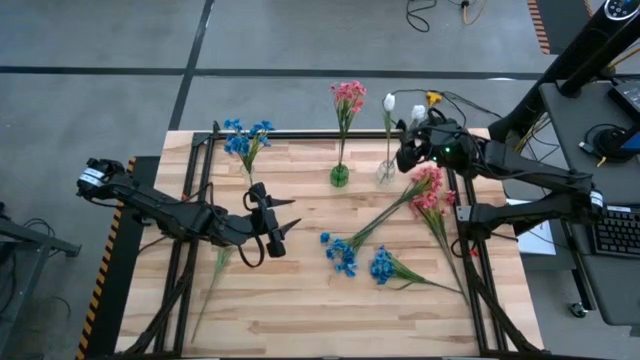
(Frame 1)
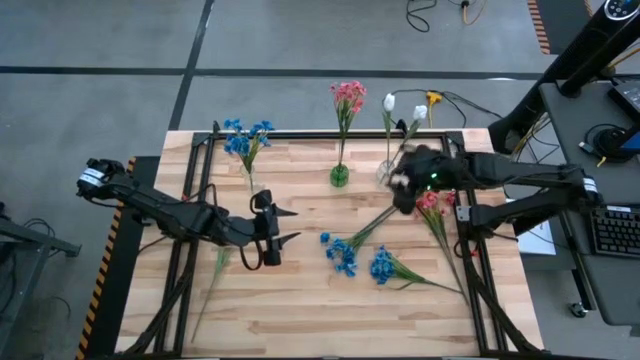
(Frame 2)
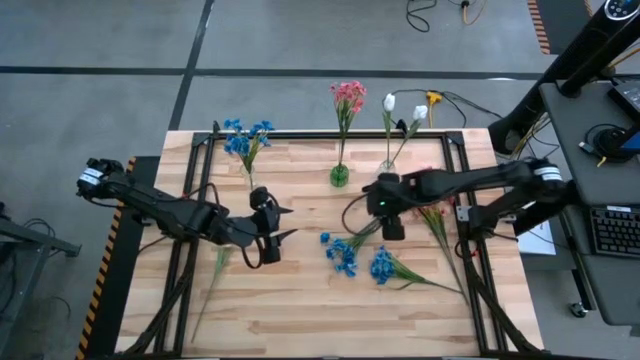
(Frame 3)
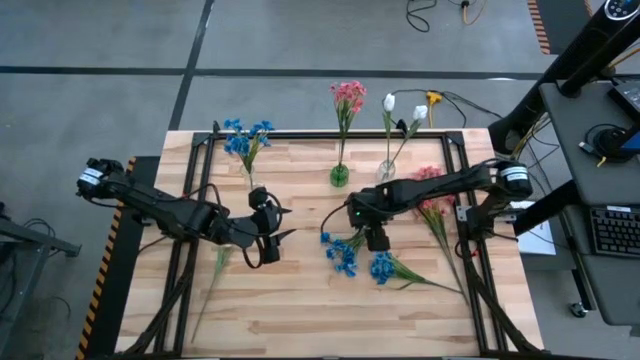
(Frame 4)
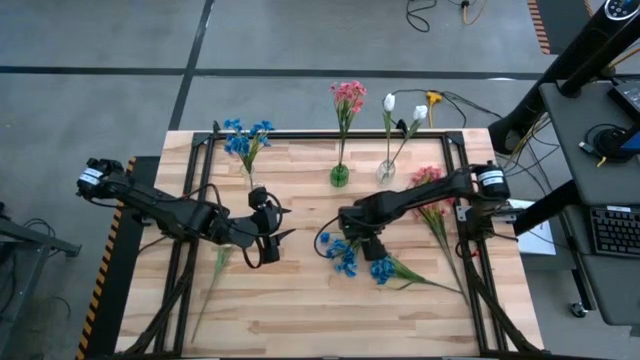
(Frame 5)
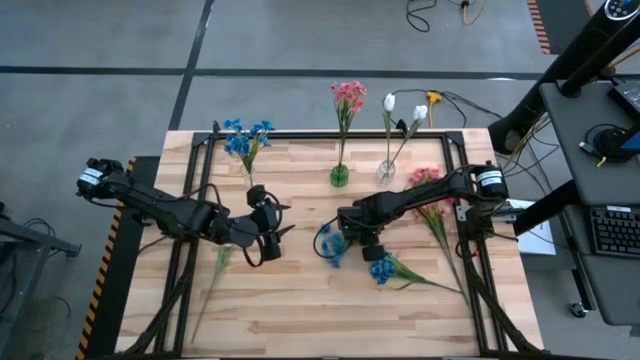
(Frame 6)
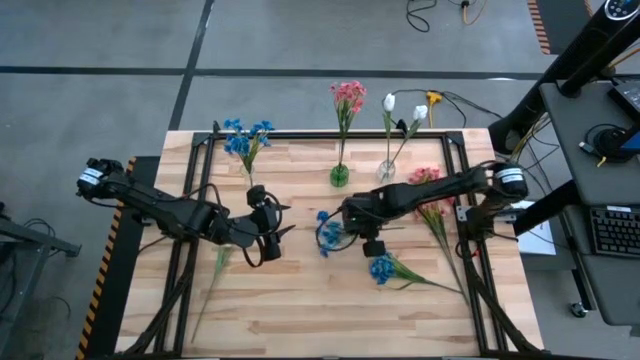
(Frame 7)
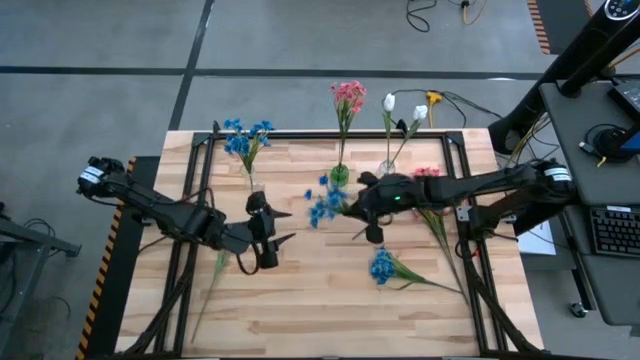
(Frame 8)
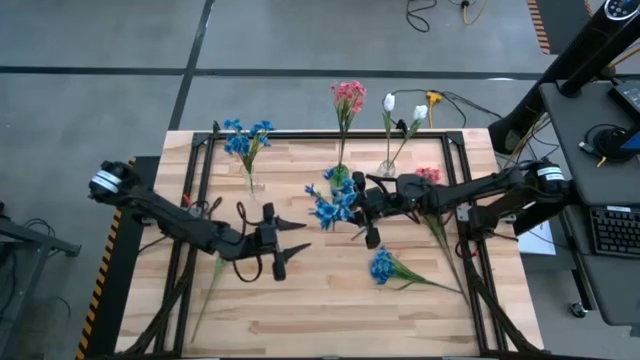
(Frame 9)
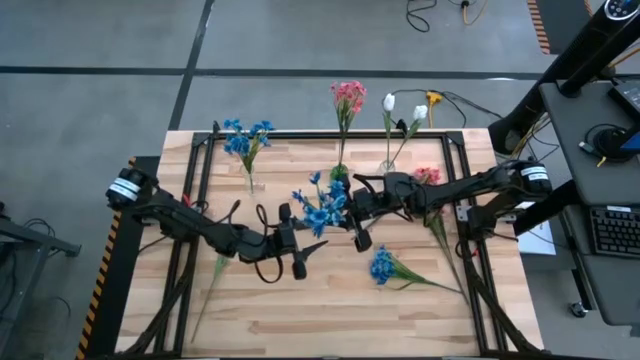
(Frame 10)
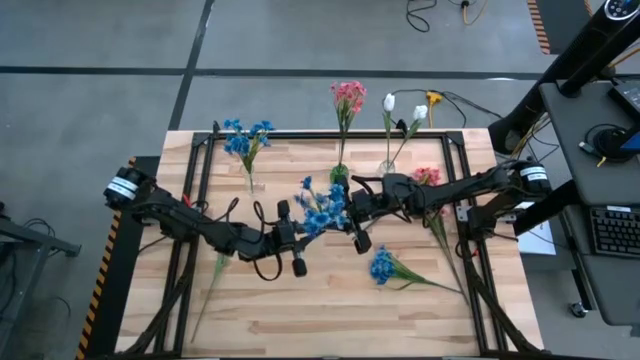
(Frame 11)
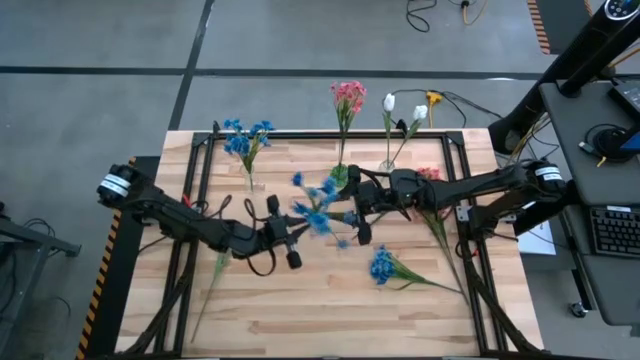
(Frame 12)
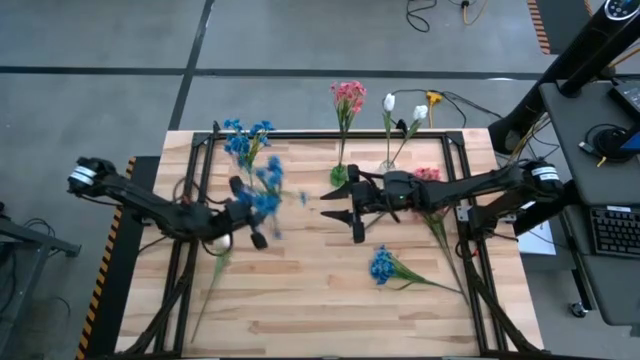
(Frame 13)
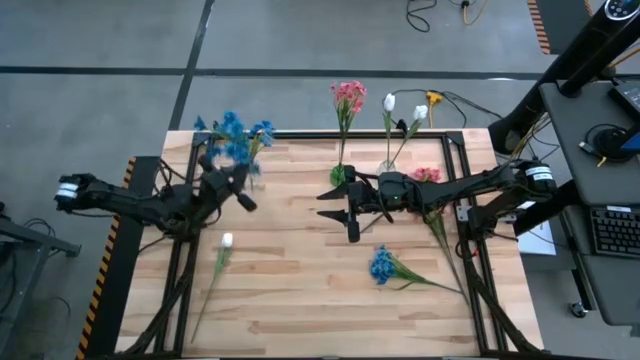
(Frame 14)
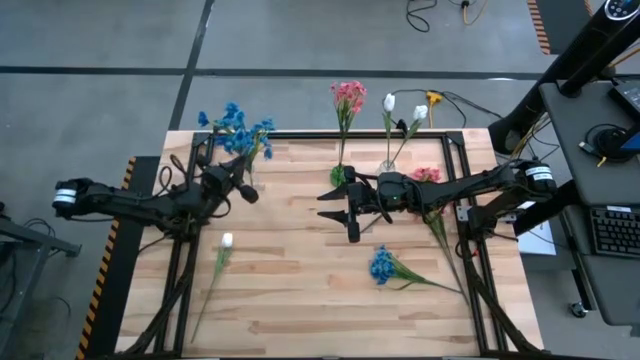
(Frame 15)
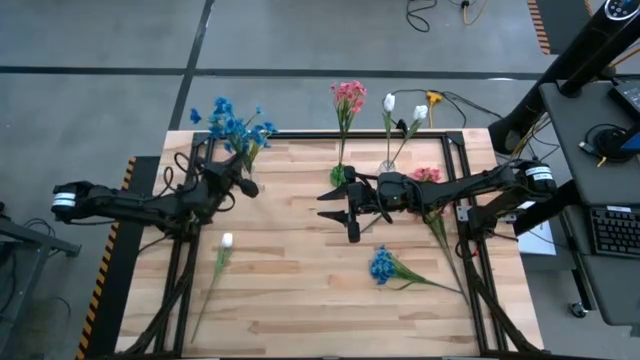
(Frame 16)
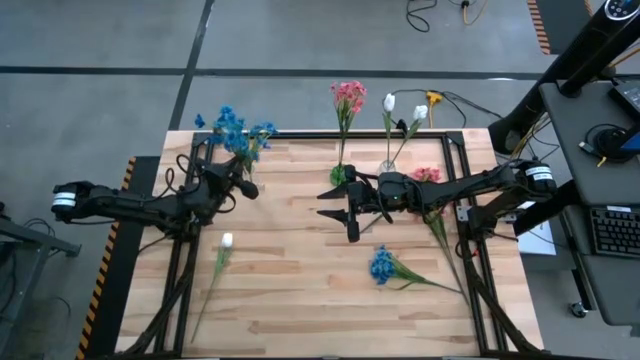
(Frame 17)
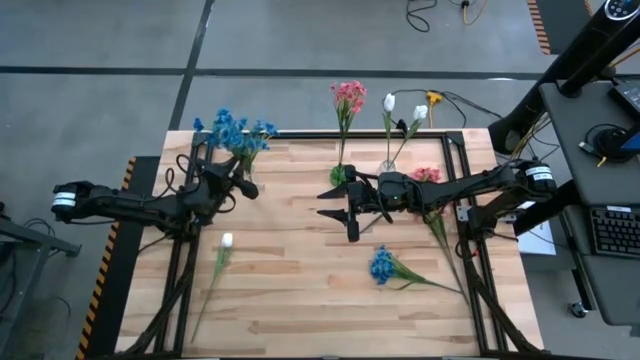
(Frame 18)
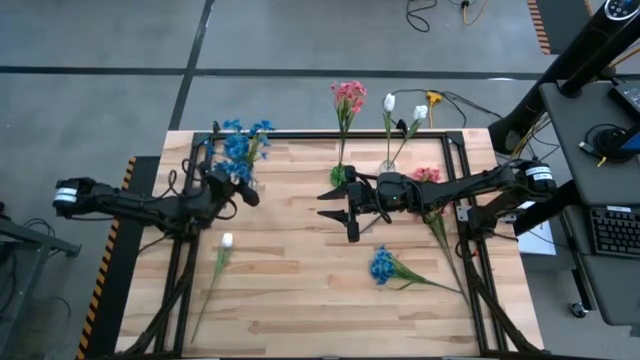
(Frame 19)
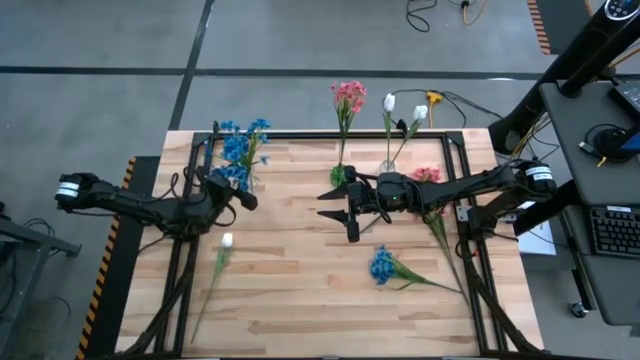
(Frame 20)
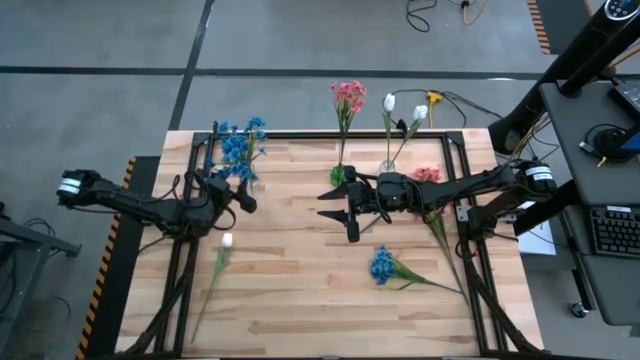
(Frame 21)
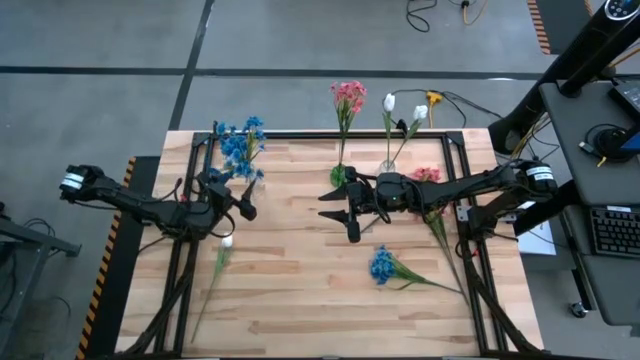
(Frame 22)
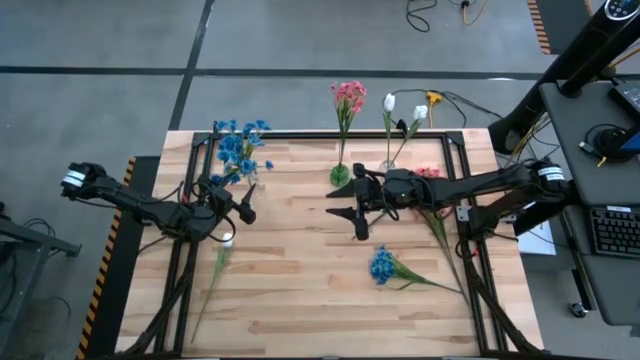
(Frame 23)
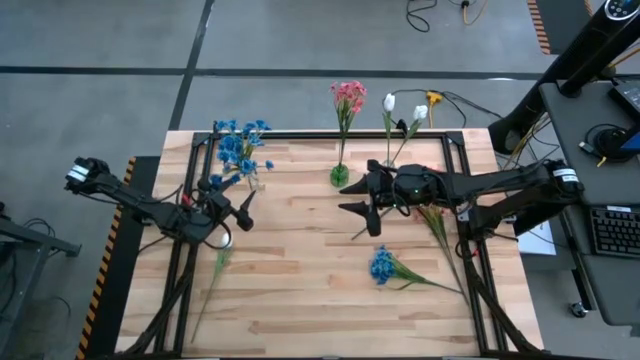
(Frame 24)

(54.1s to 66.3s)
Task: Sort flowers into vase by color
Put the left blue flowers into the left transparent vase

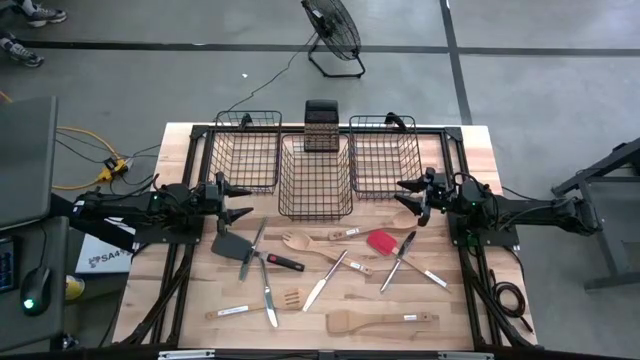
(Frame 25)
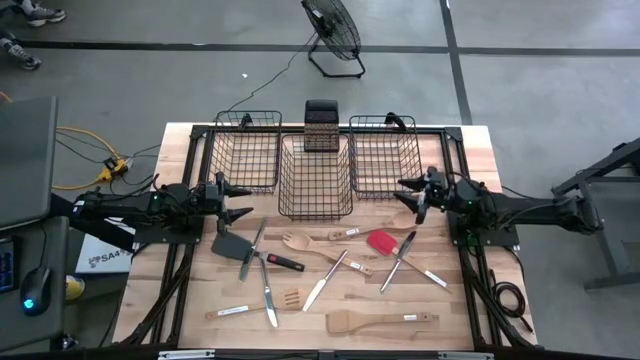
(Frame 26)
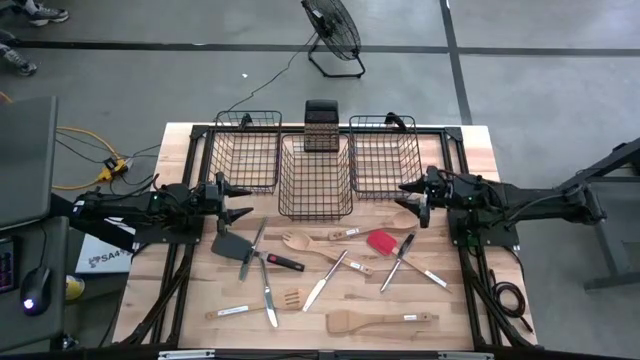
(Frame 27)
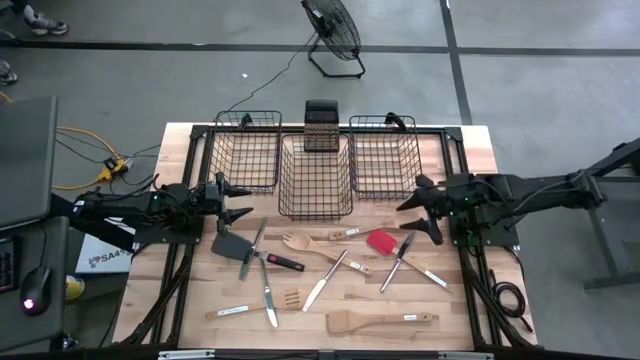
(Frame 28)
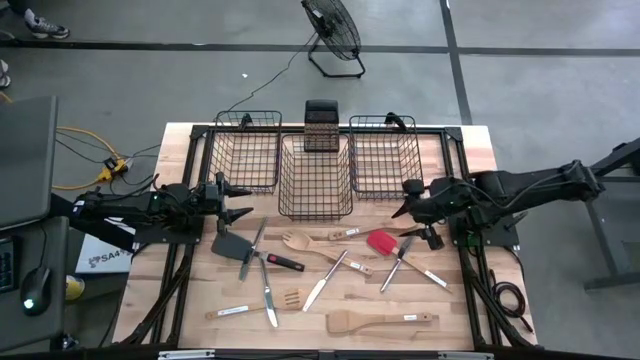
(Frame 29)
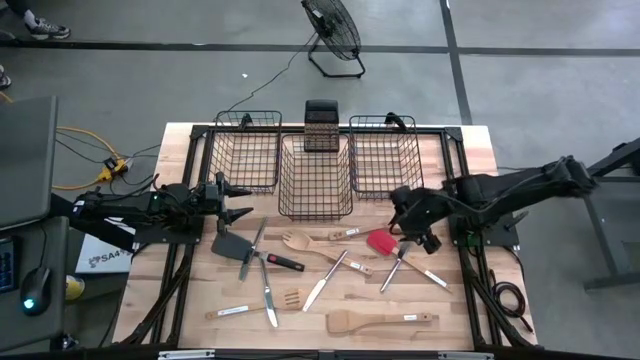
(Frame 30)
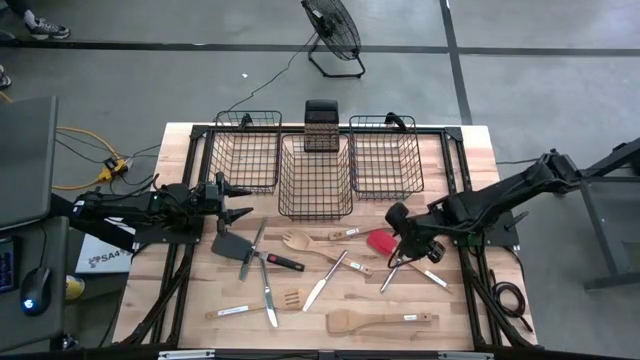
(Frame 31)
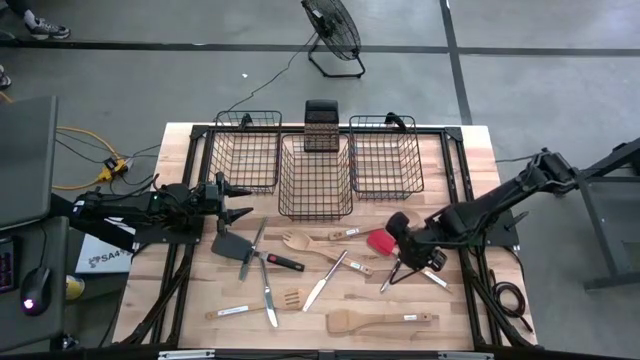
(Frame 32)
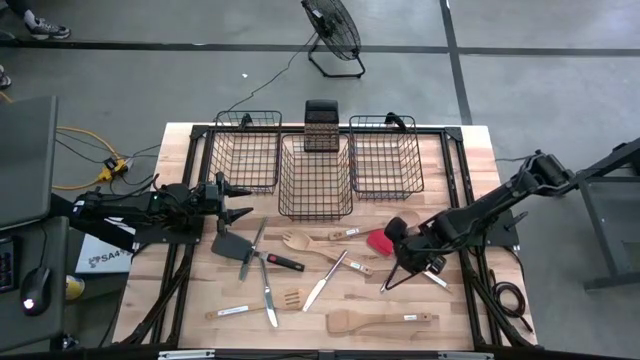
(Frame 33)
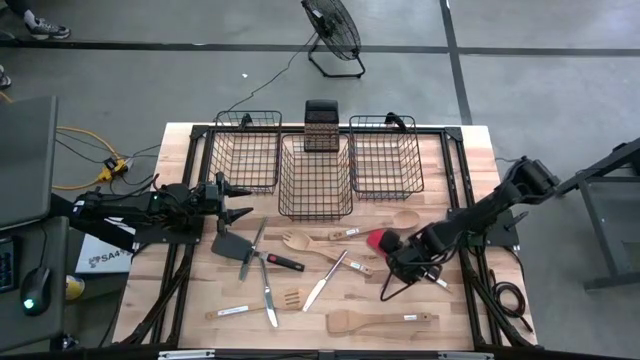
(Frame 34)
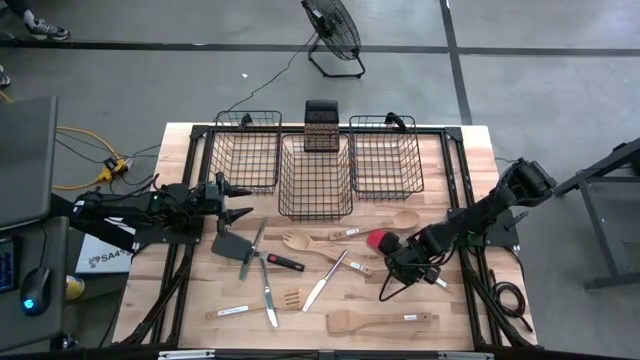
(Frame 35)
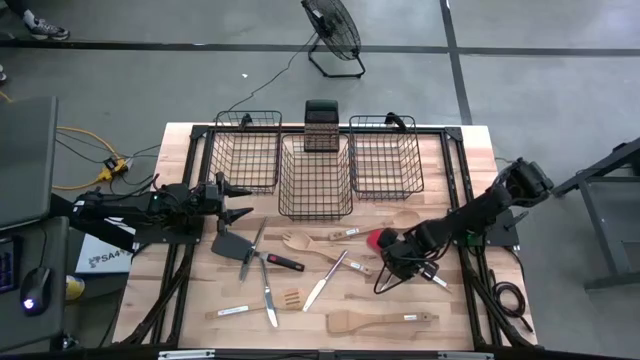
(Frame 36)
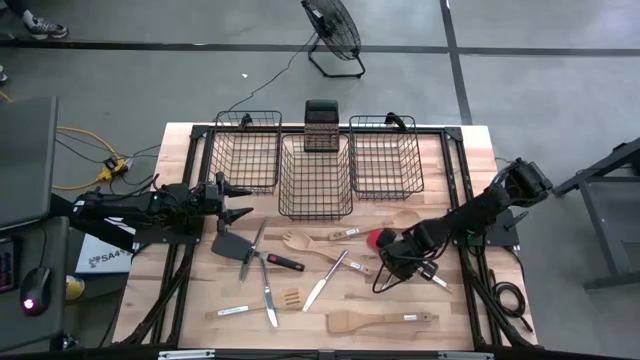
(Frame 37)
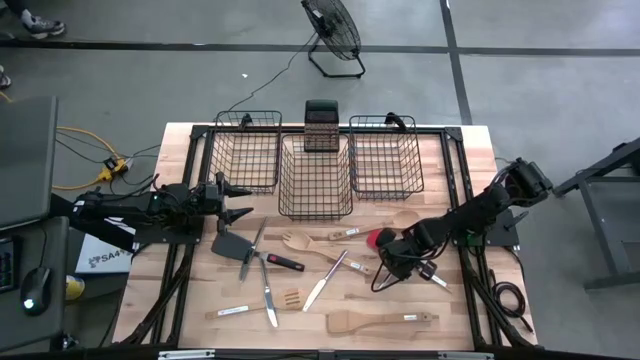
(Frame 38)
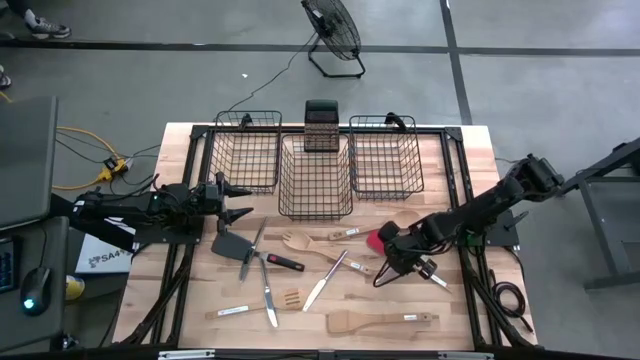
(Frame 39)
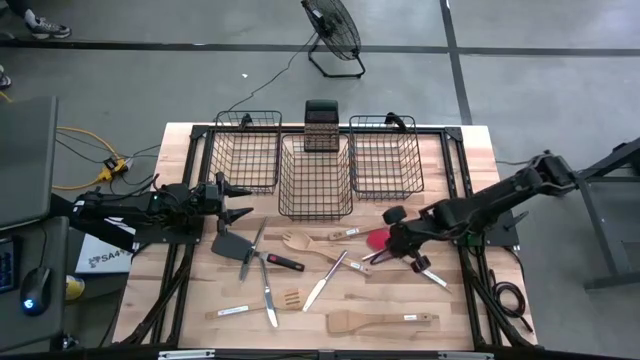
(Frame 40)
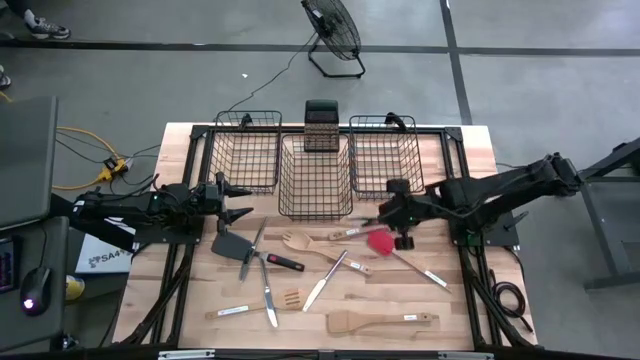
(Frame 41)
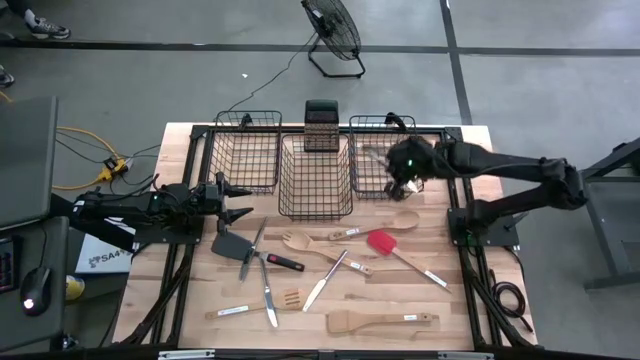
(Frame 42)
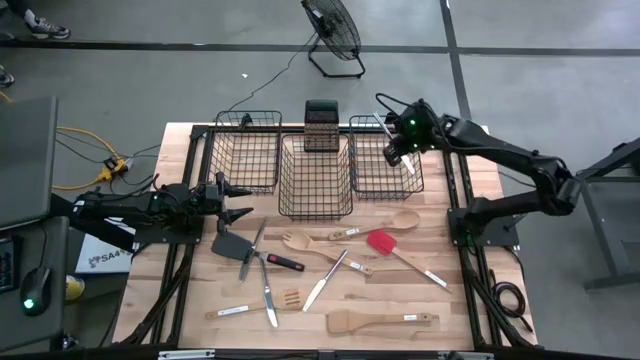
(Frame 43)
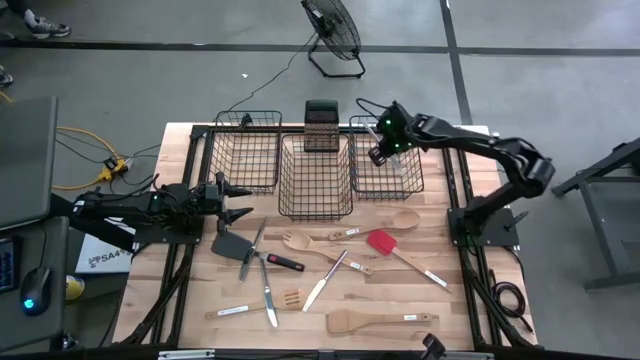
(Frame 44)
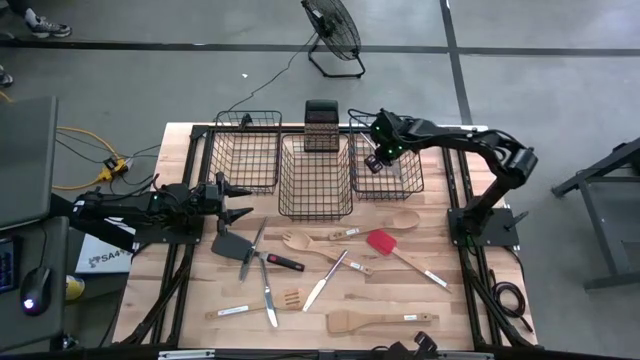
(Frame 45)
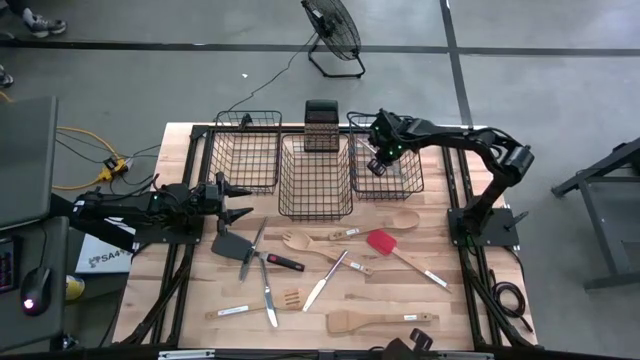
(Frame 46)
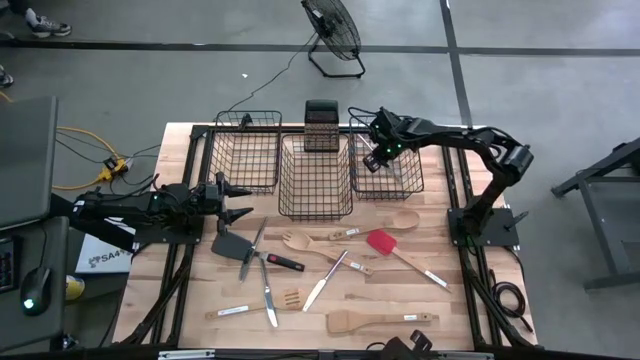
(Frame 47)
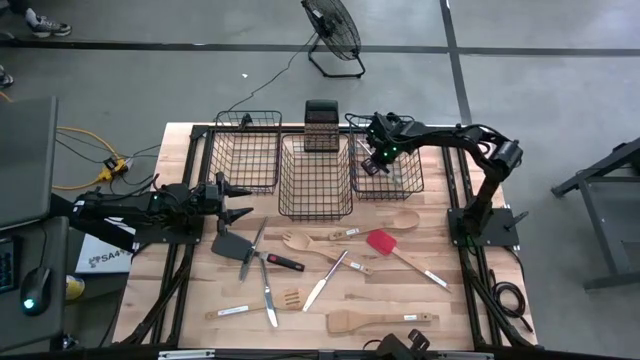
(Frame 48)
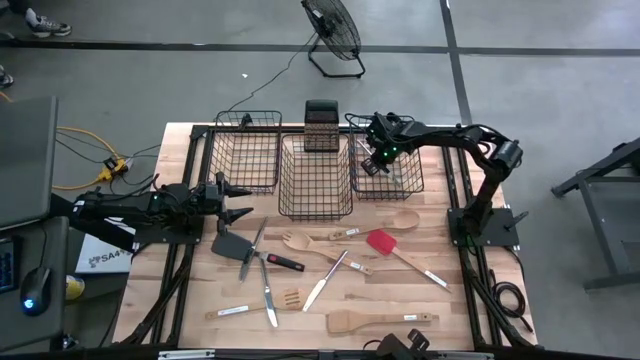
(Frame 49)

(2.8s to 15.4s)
Task: Pick & Place Kitchen Items
Put the silver table knife into the right wire basket
